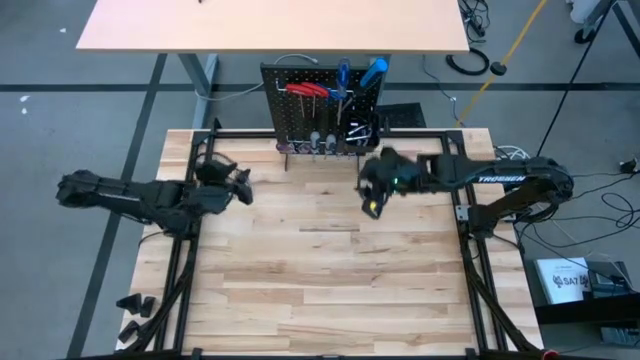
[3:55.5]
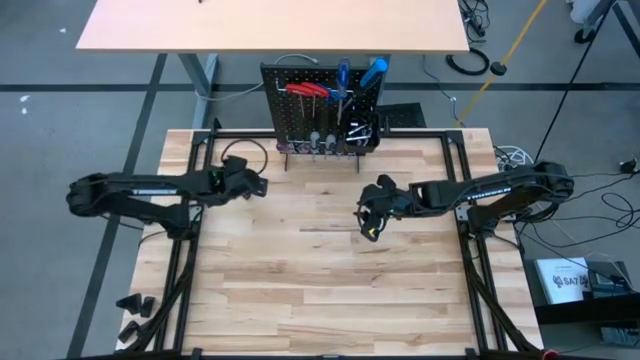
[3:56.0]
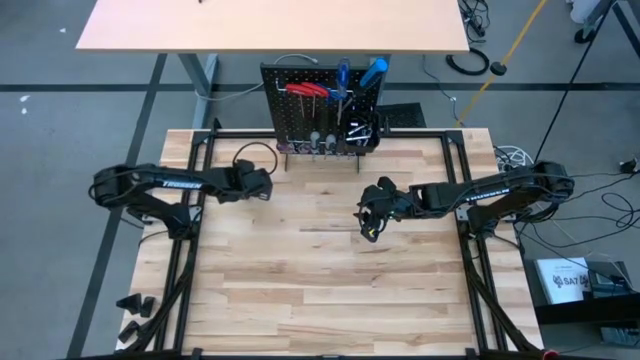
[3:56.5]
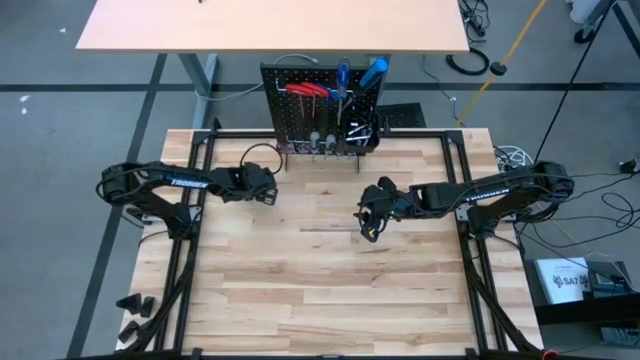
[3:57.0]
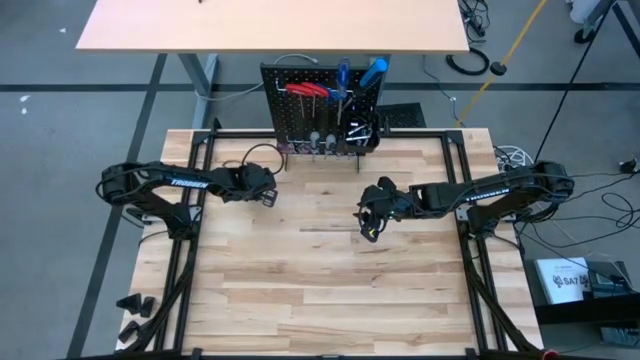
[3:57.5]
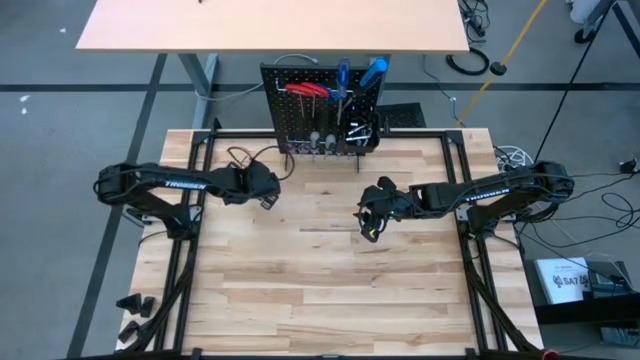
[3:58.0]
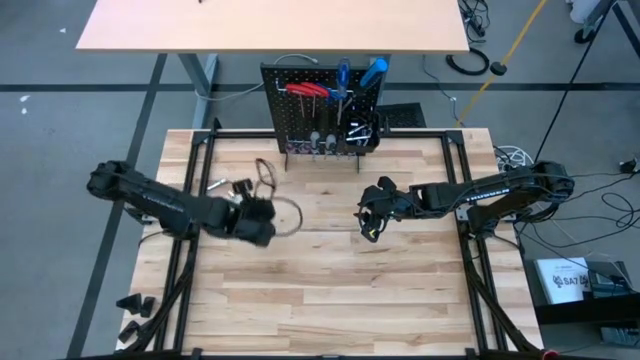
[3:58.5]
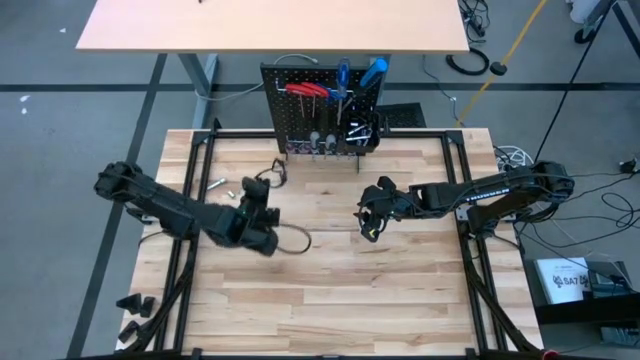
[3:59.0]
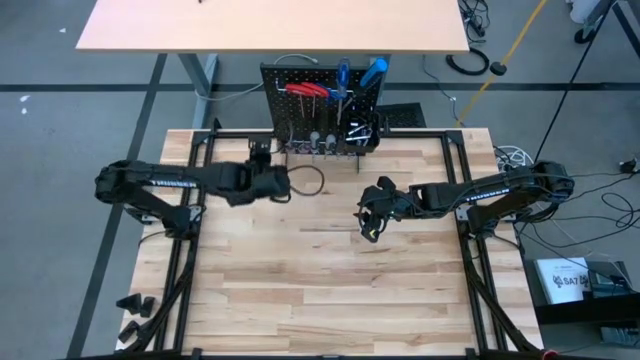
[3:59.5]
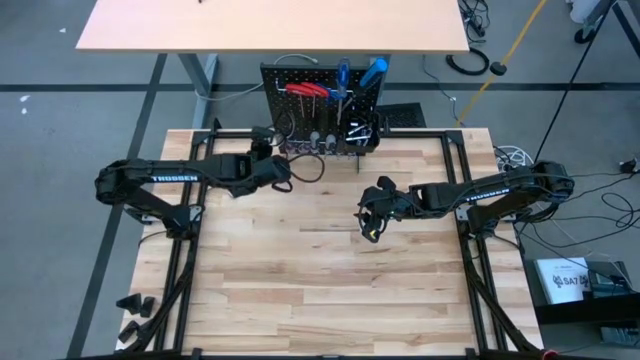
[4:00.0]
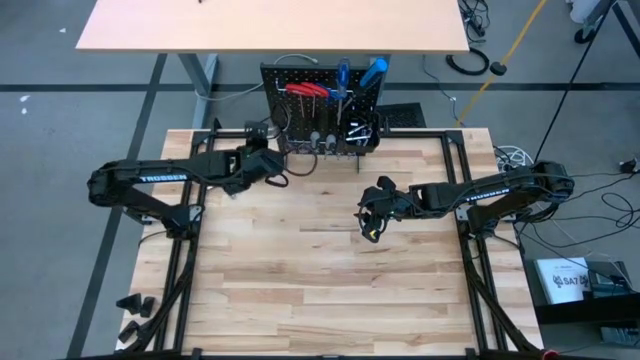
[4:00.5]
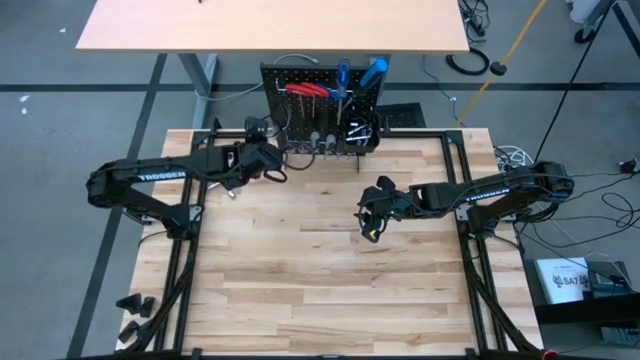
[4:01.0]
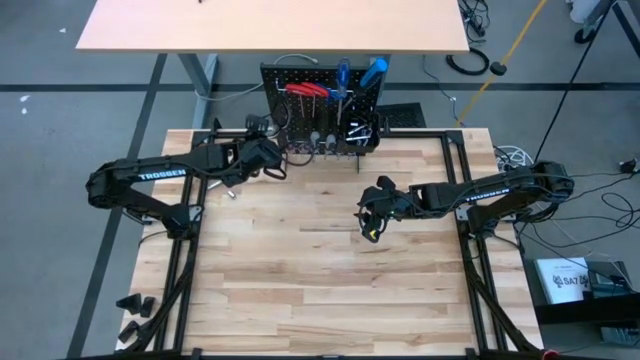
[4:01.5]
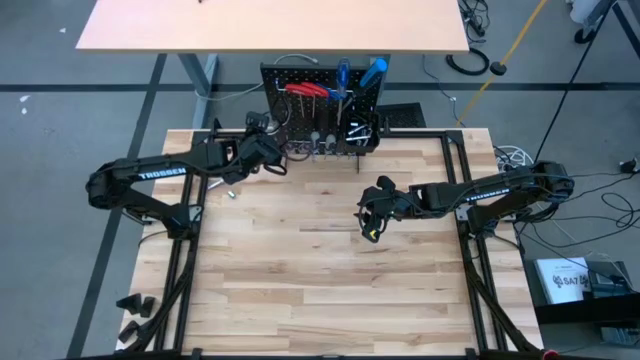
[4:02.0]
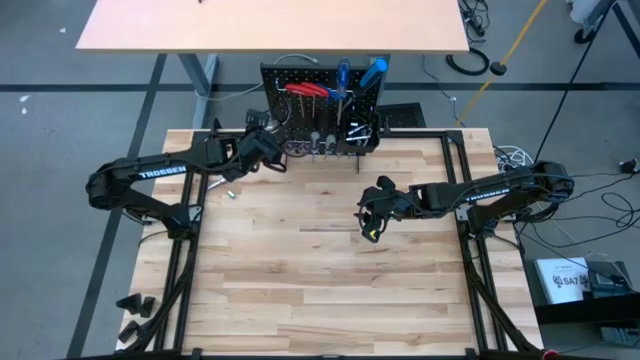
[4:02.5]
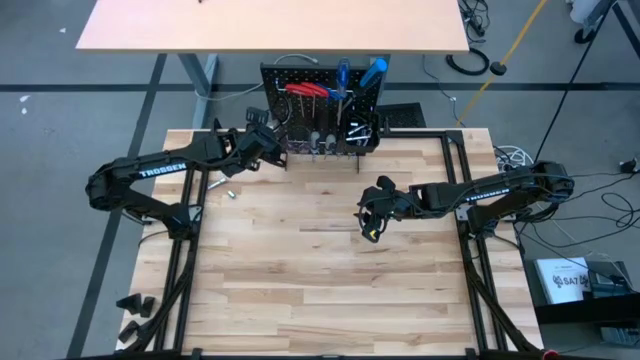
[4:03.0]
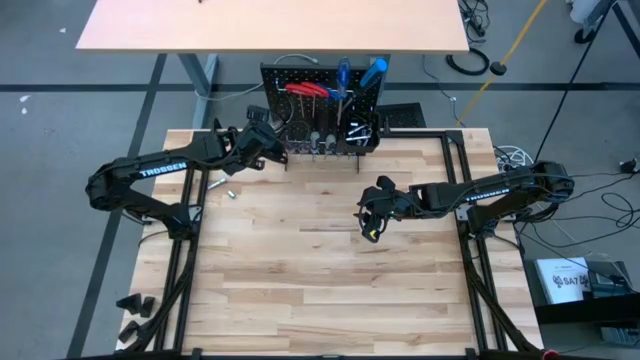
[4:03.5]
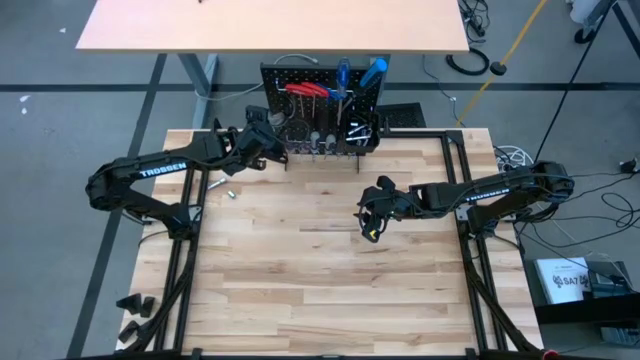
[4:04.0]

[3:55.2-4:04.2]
Task: Hang tools onto peg board
Hang the safety glasses onto the peg board

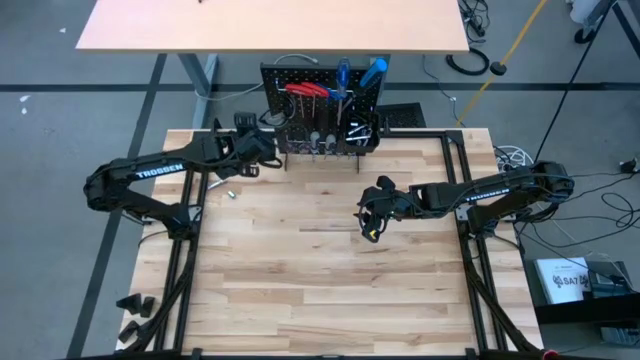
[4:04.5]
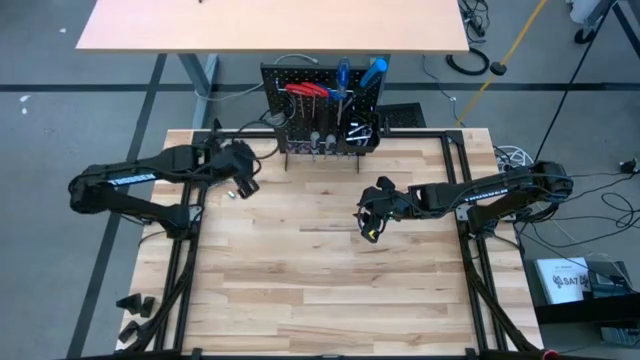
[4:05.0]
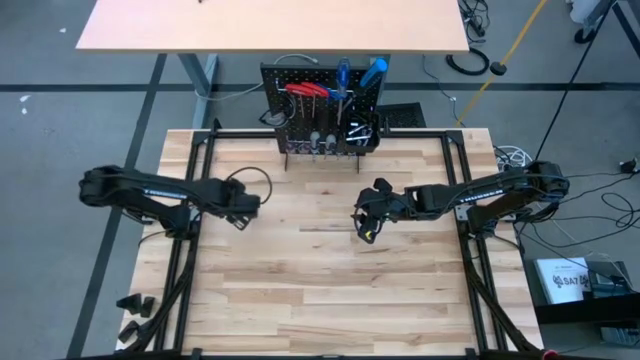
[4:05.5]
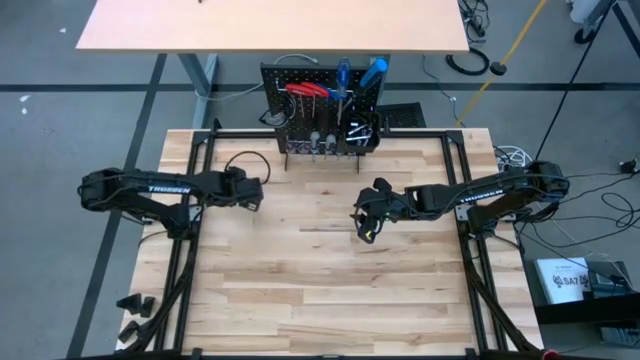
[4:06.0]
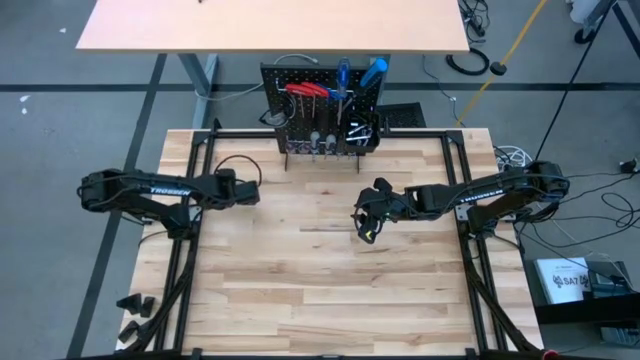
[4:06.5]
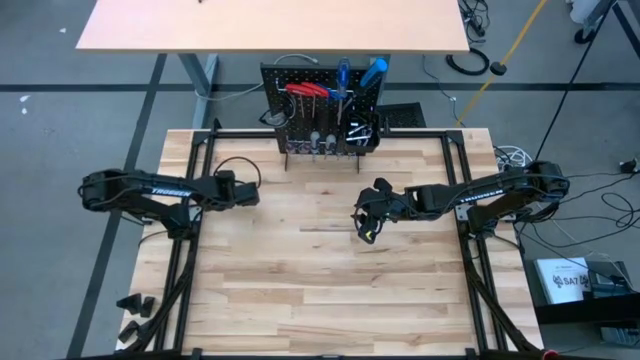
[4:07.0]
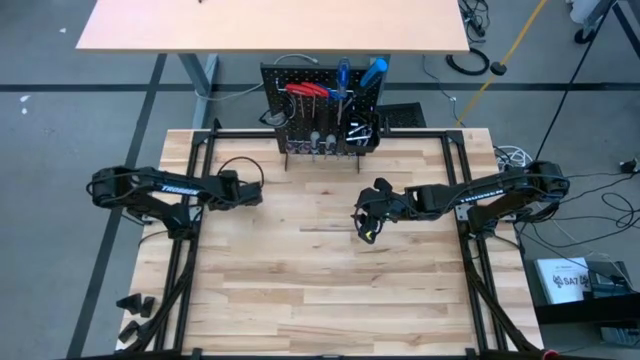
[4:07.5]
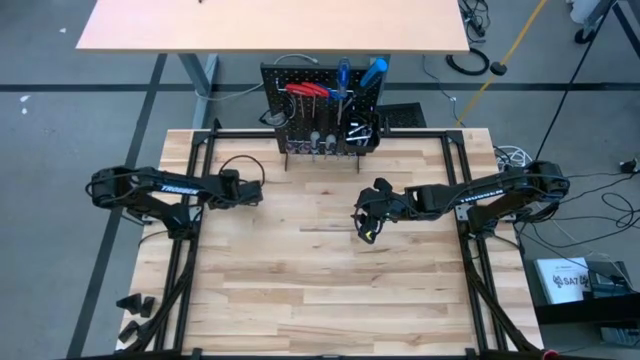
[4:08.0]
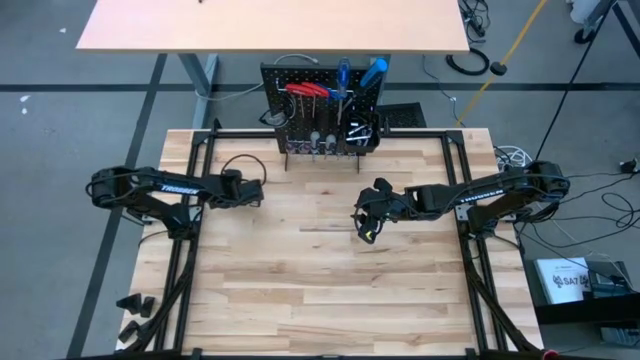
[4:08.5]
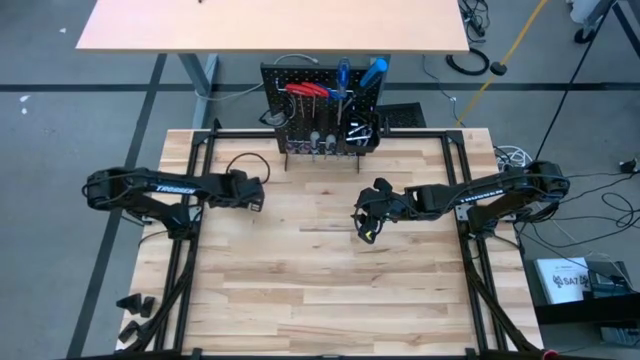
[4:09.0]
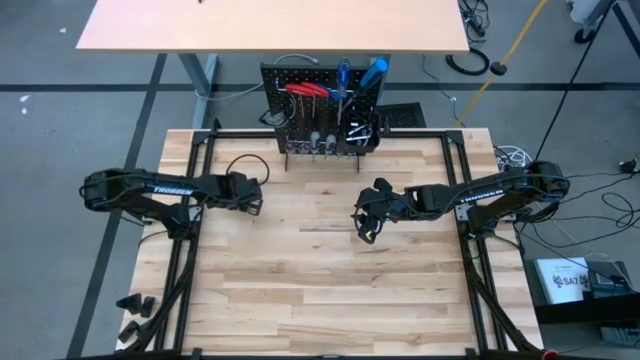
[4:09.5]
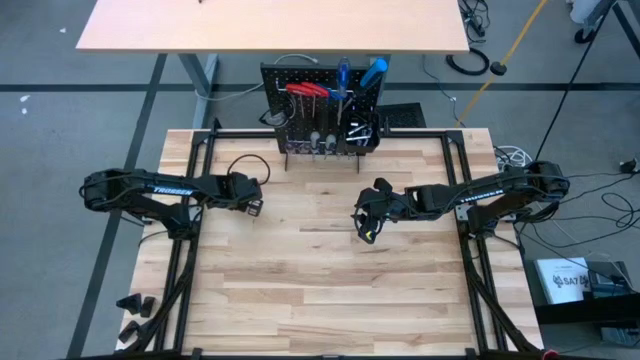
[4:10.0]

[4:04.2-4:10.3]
Put the socket wrench into the black bin on the peg board

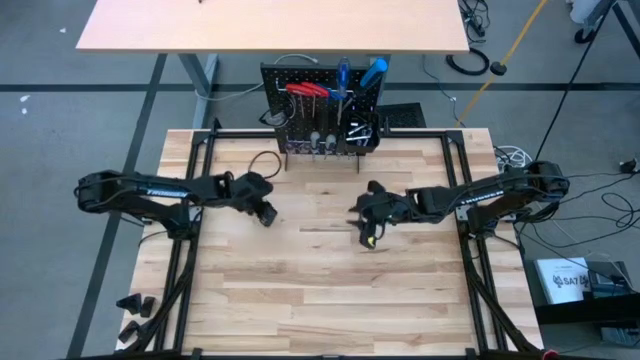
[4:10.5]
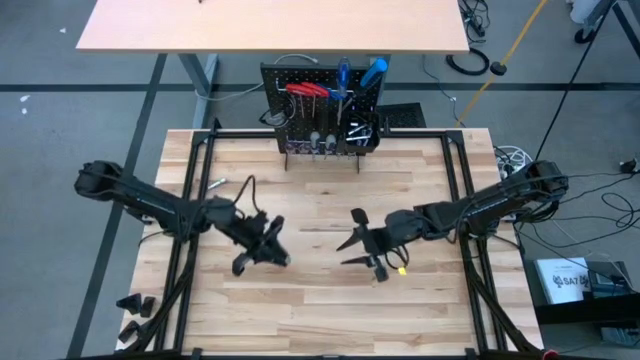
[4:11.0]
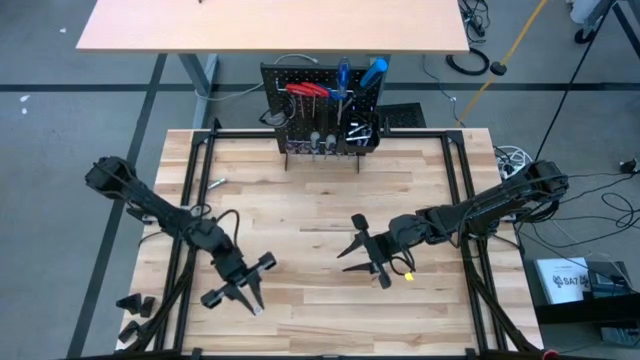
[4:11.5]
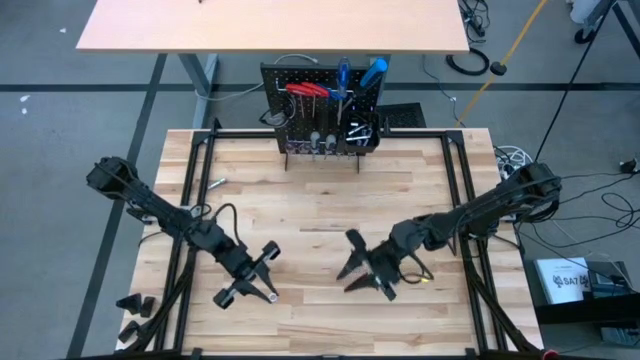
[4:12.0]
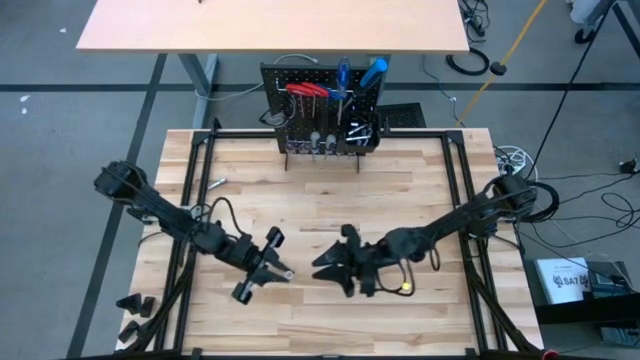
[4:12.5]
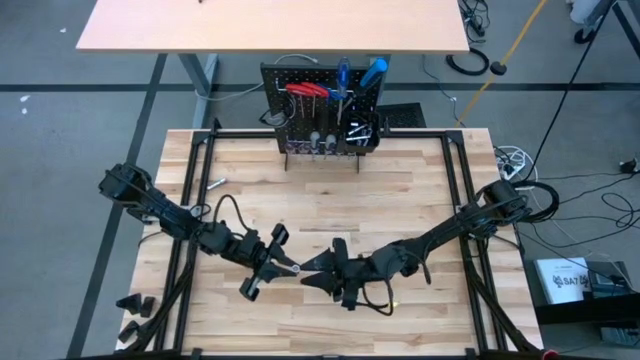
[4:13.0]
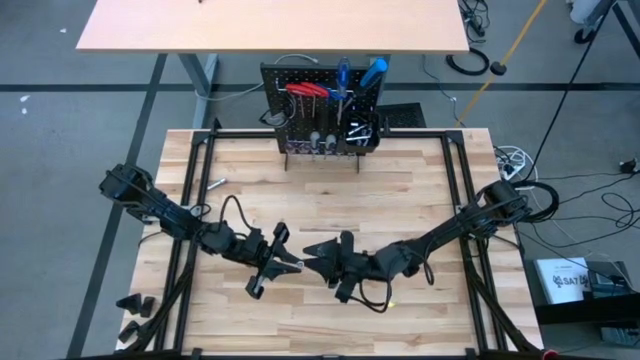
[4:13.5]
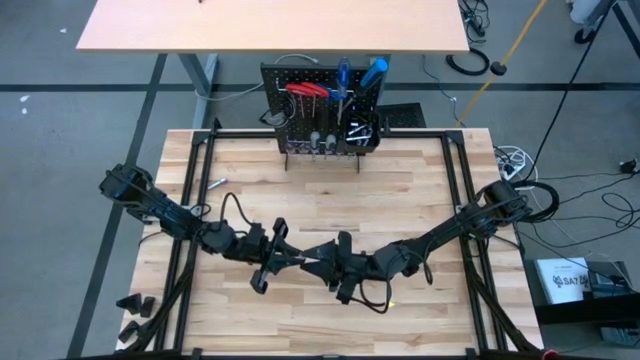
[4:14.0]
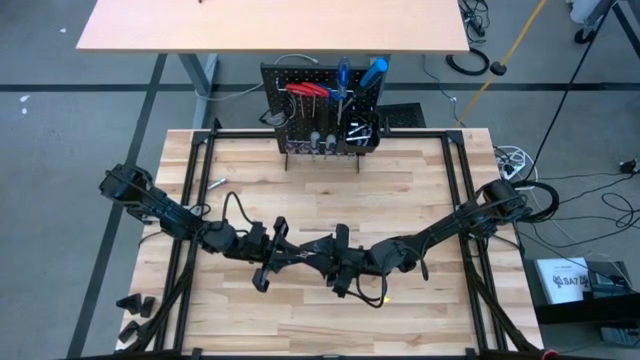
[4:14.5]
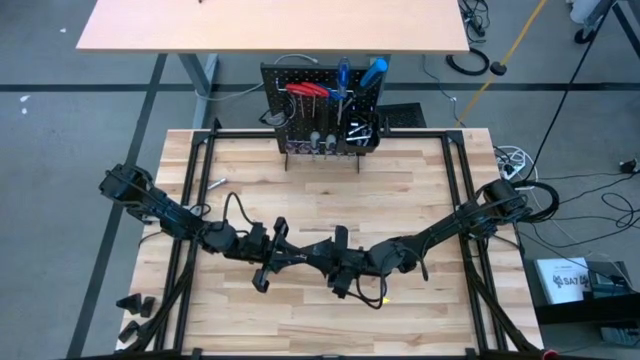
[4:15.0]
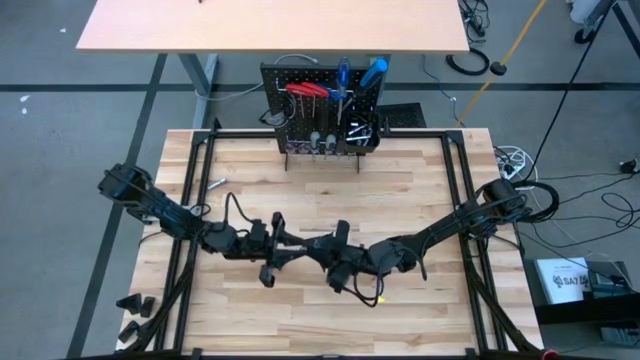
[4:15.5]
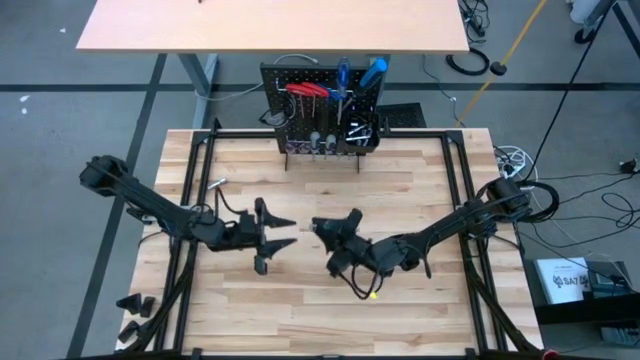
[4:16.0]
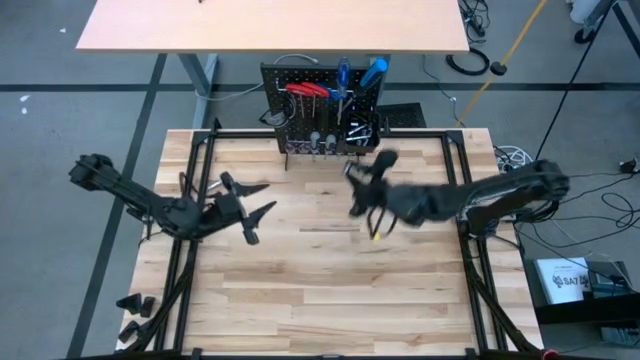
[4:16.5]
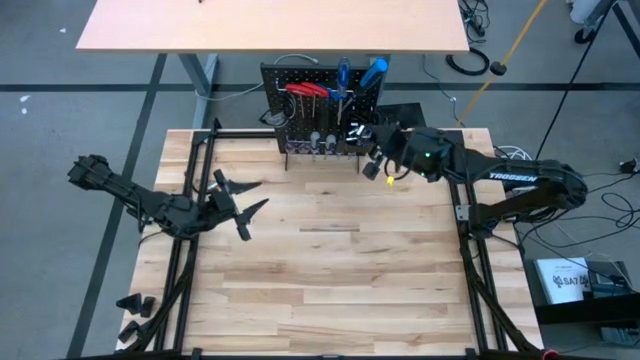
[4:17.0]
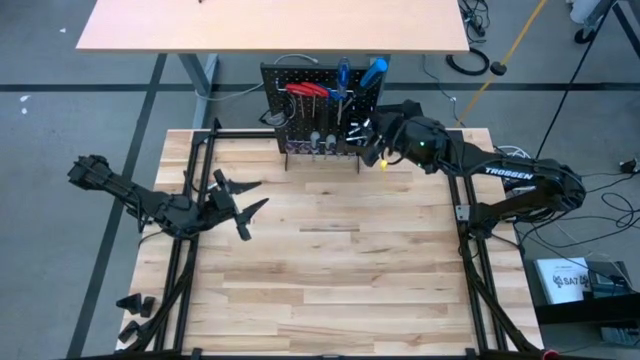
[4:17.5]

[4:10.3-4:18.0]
Put the socket wrench into the black bin on the peg board
